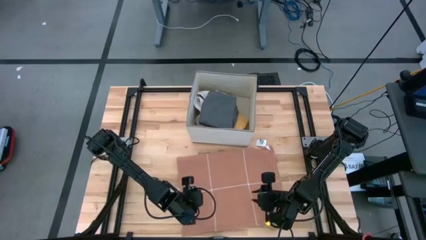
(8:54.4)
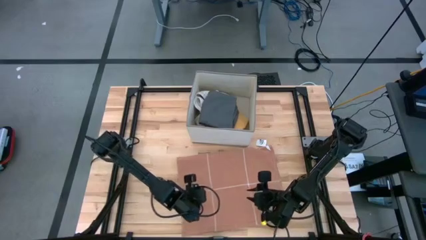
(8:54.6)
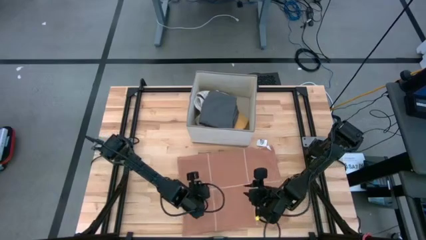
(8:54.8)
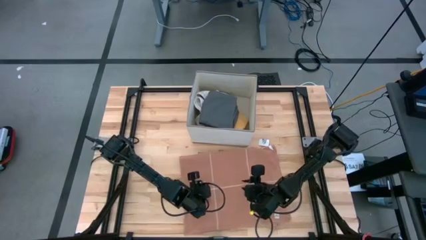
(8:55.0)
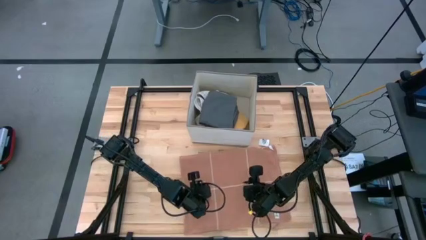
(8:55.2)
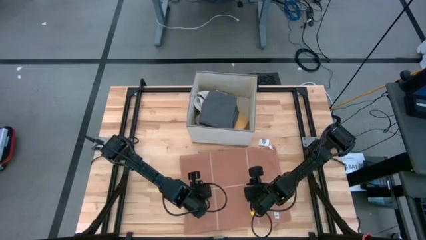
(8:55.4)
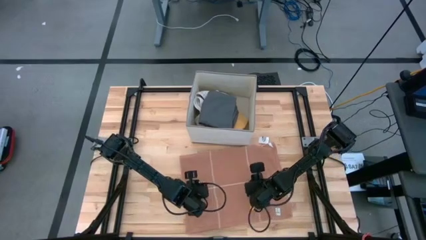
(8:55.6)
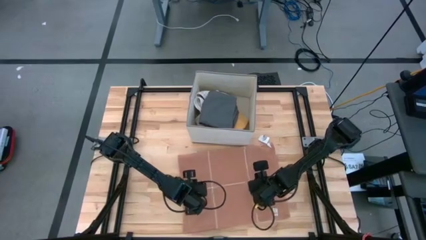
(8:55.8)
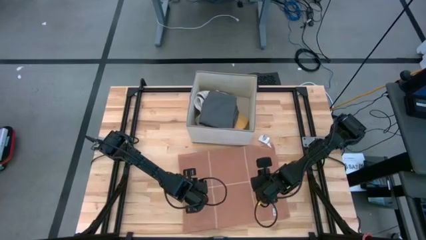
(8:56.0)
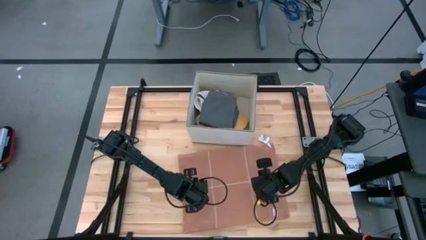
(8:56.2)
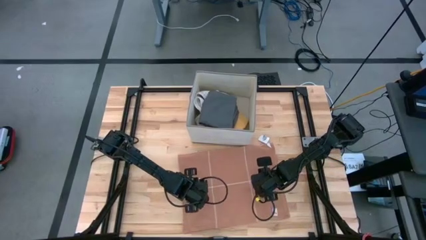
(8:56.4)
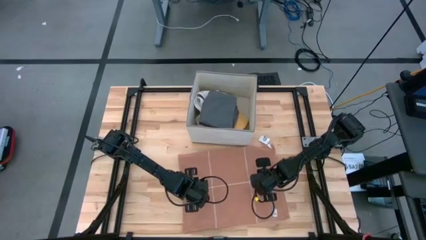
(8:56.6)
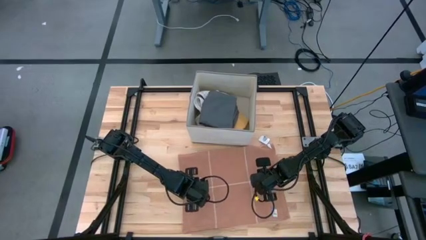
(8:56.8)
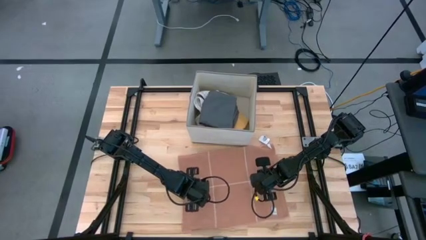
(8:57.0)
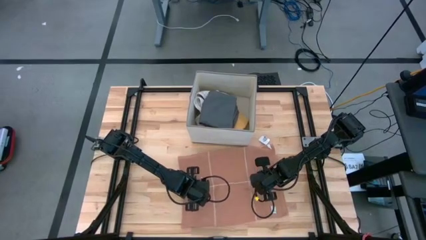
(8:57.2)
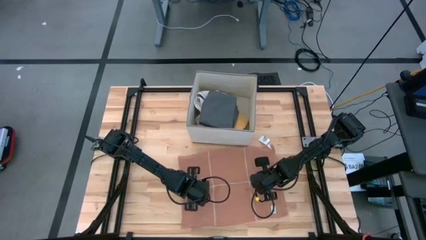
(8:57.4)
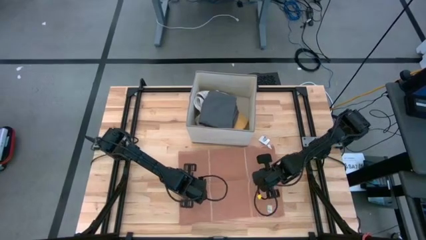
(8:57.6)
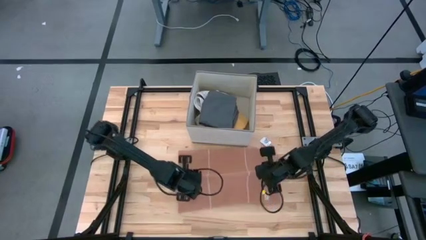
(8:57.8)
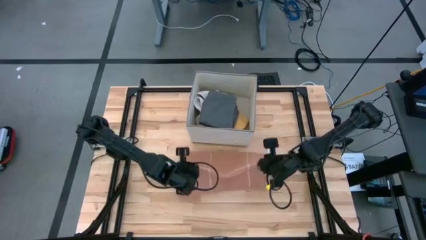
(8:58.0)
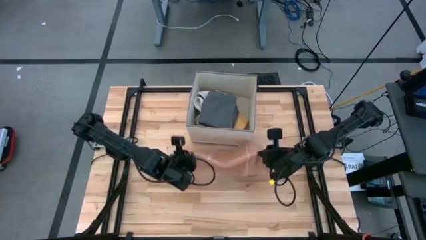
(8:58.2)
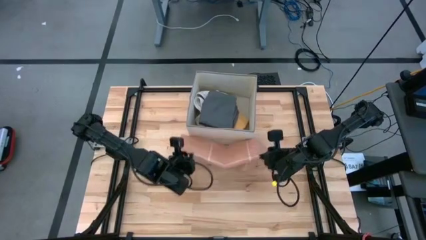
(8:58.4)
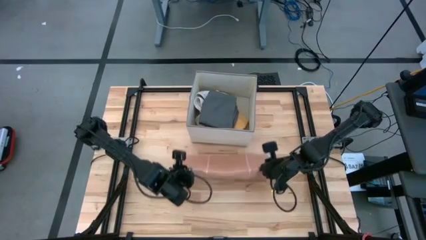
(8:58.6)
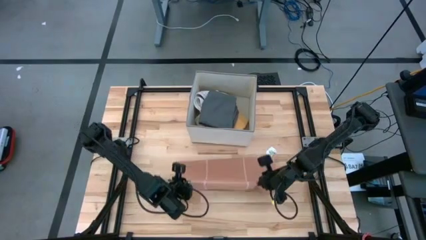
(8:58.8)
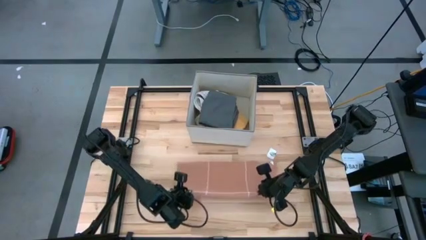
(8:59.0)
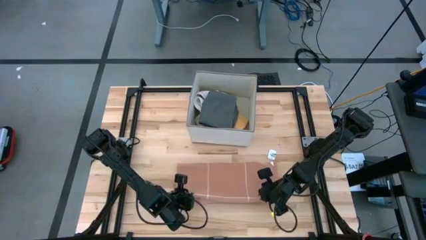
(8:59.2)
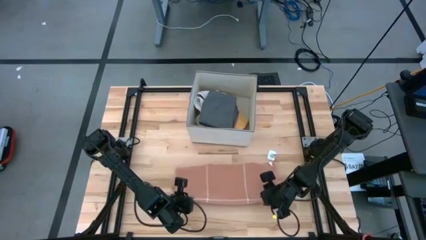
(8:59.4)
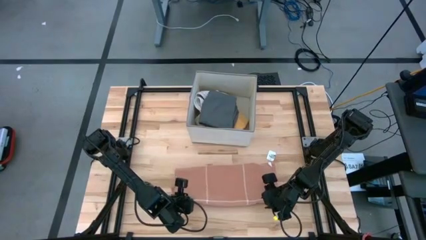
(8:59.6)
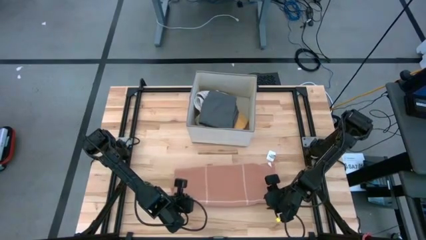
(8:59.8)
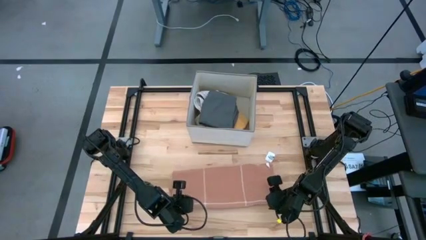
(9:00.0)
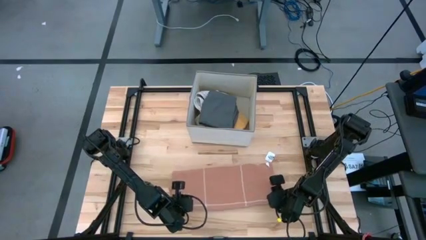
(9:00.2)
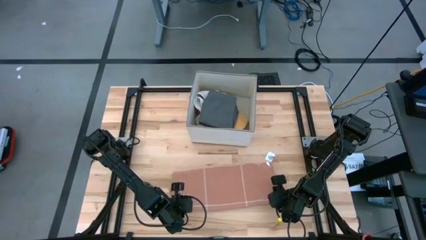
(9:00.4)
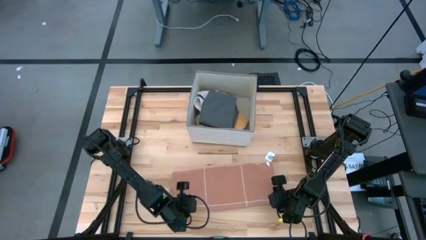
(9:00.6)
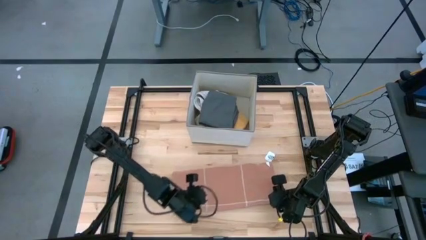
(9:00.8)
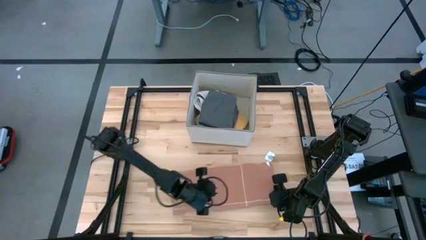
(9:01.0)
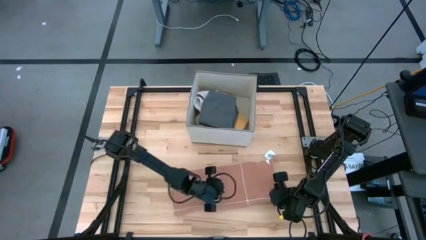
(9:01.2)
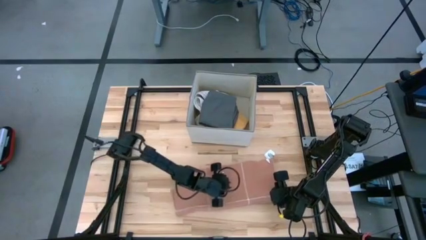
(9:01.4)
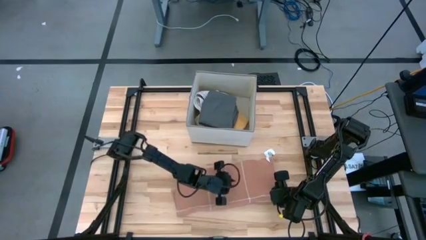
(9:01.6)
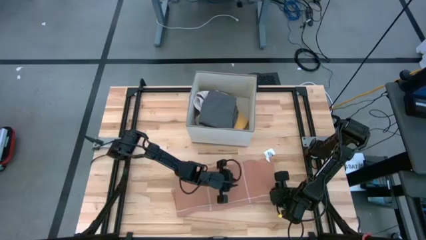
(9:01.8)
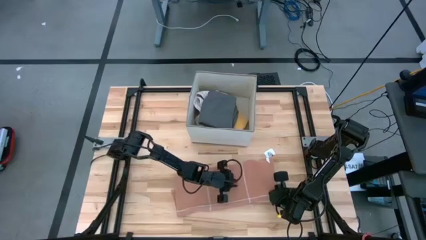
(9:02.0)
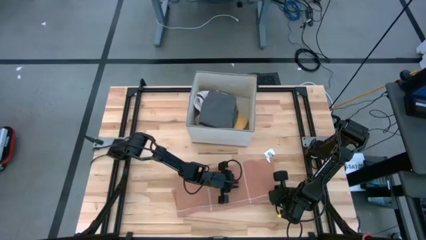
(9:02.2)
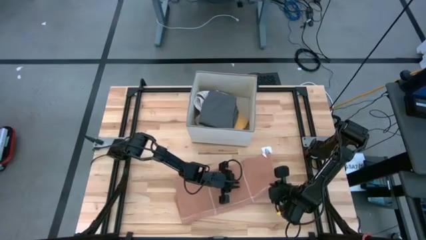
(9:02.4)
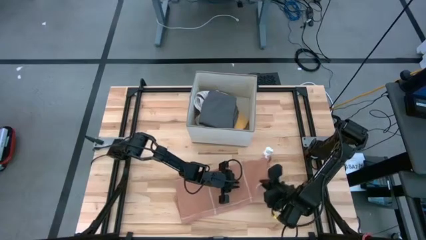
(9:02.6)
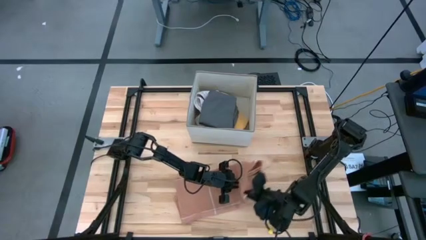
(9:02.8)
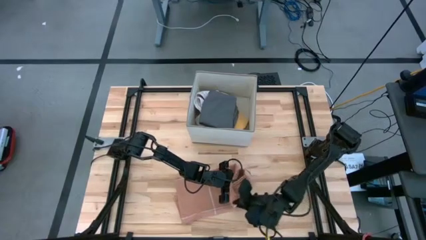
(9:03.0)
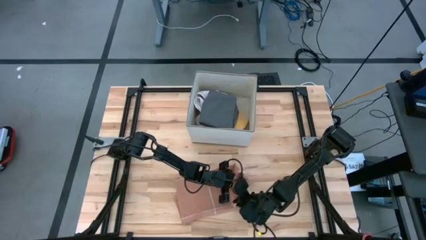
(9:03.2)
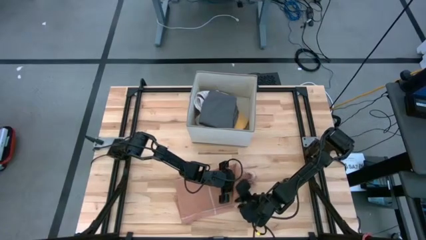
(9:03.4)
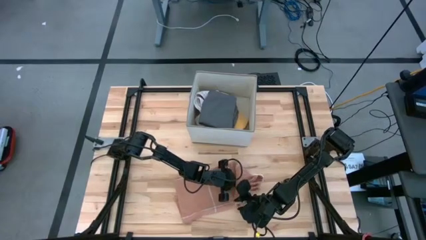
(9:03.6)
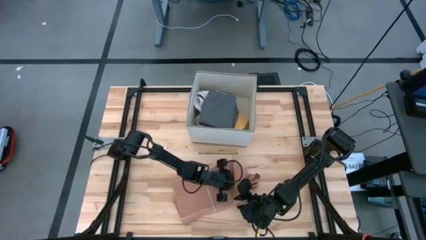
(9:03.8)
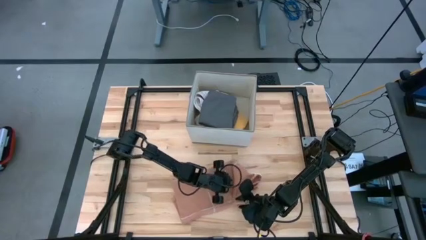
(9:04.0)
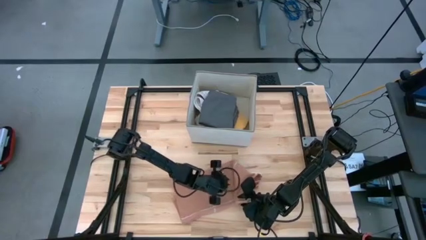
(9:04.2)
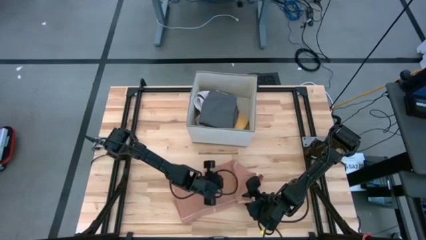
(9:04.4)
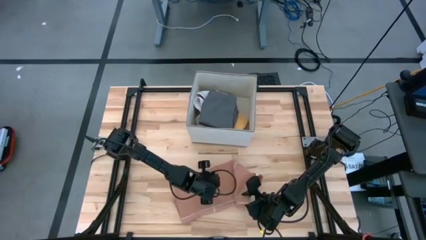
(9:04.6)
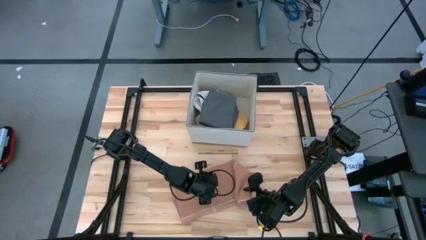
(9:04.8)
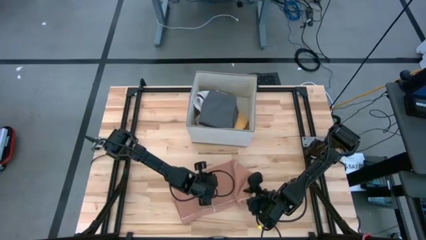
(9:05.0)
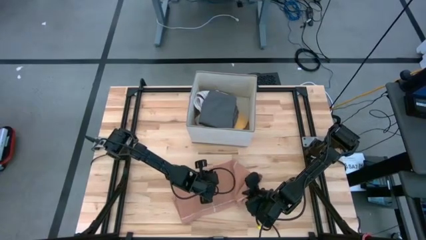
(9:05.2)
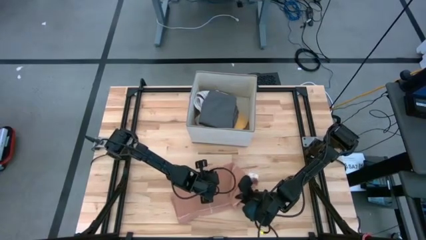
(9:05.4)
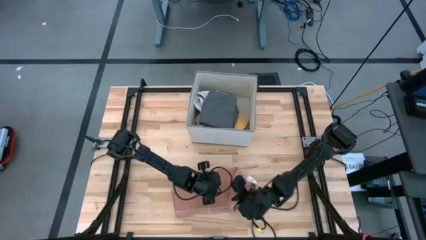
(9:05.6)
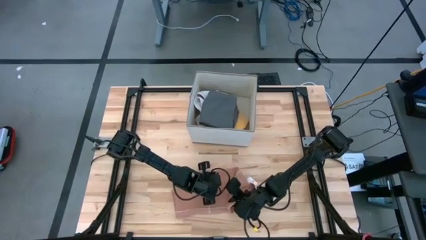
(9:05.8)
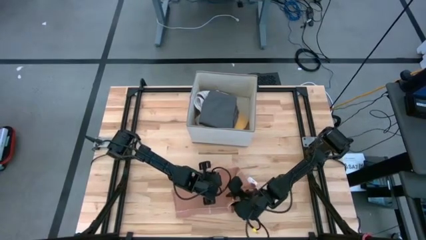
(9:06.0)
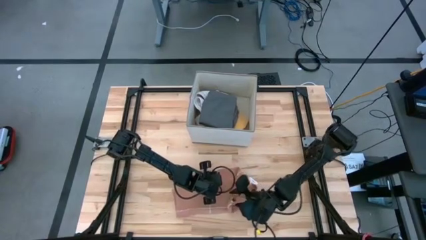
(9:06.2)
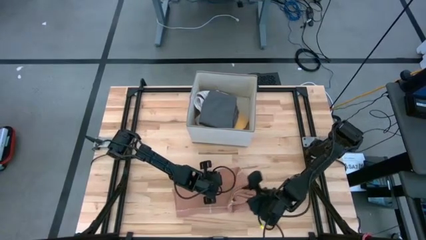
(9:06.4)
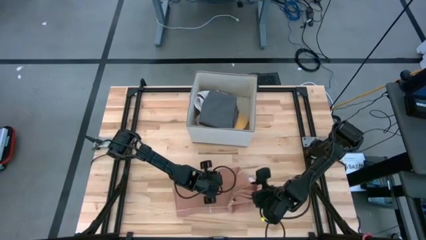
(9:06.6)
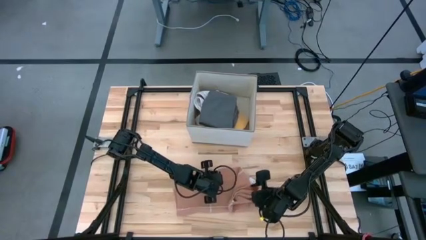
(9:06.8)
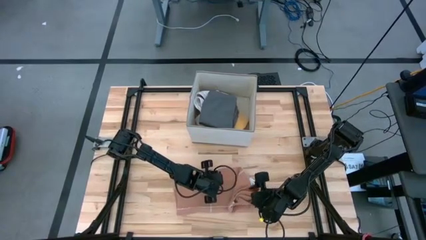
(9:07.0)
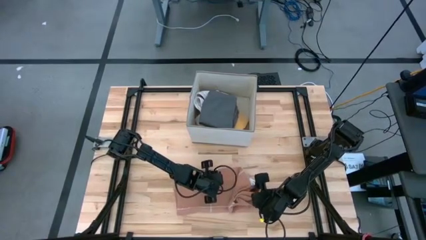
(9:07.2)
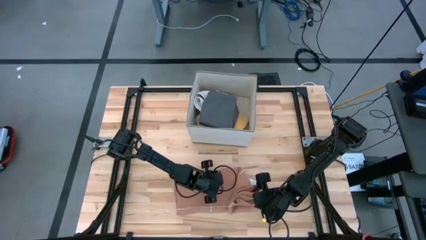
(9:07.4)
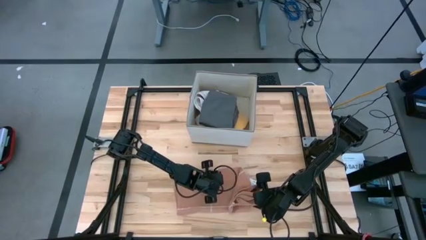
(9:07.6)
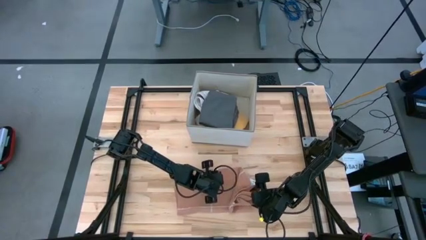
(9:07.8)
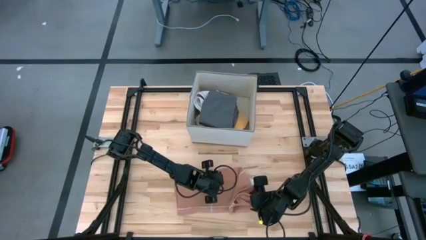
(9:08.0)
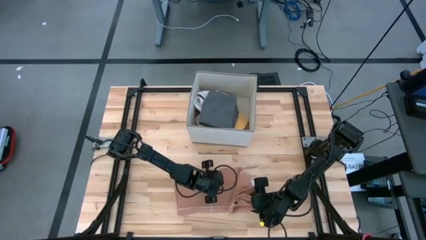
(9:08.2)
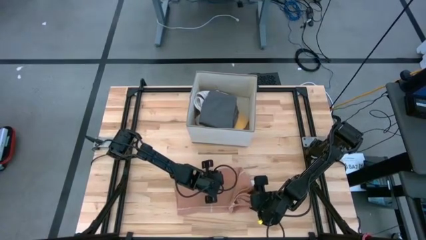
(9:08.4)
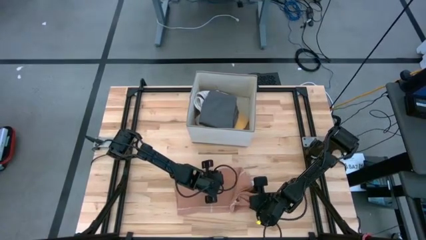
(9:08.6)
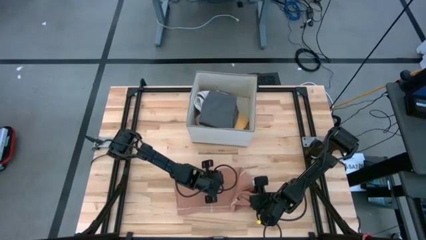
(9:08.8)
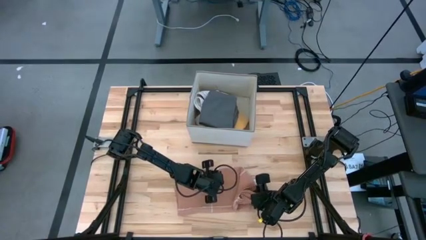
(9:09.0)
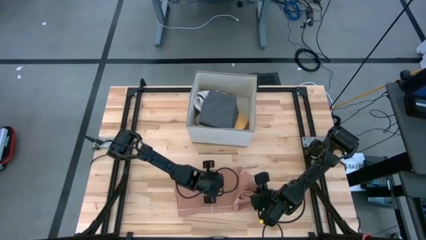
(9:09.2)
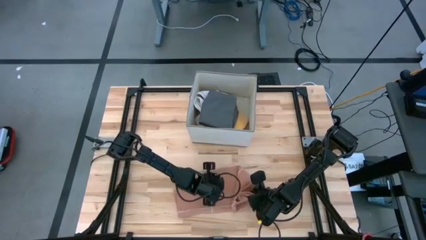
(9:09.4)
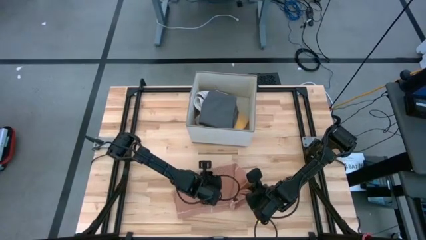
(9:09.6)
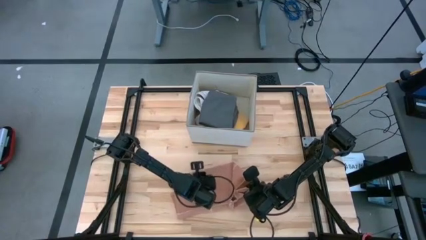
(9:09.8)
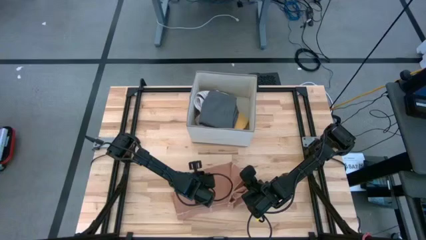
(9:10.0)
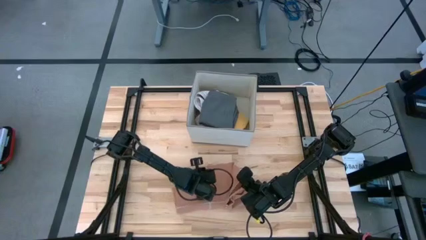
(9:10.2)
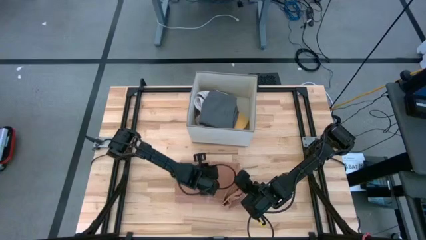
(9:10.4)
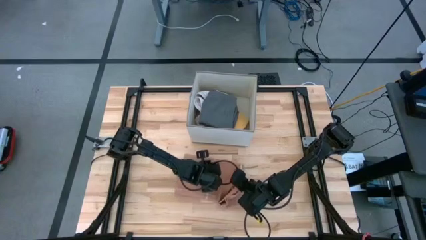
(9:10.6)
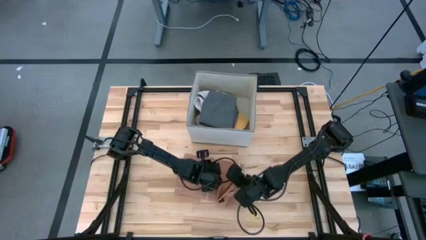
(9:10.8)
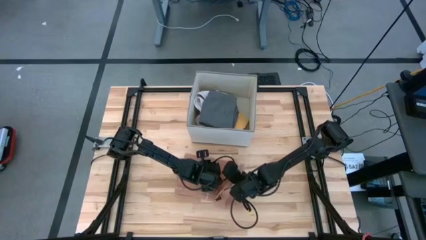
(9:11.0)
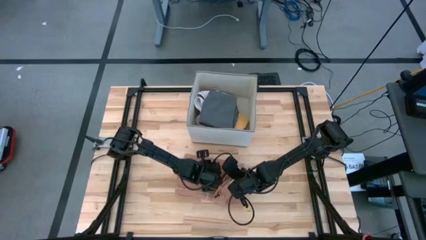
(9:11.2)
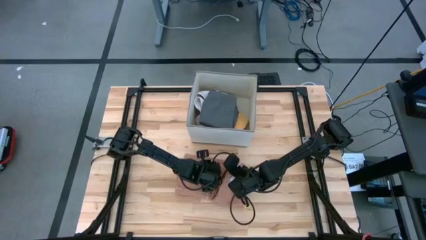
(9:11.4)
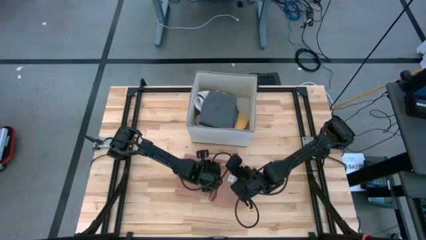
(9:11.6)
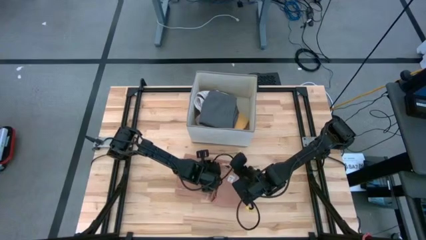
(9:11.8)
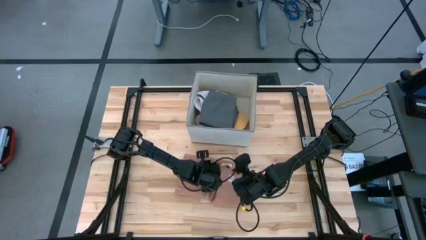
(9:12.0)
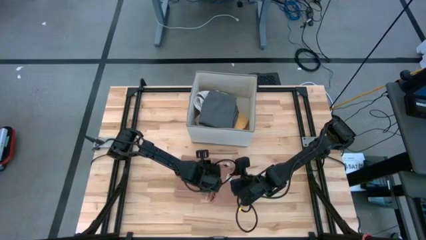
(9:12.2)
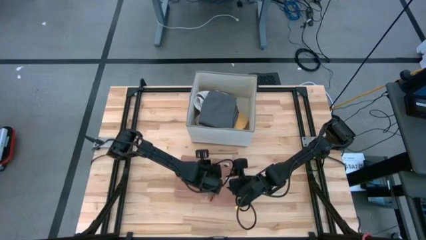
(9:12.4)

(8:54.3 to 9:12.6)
Task: Fold towel
Fold the brown towel with white checkered lines
